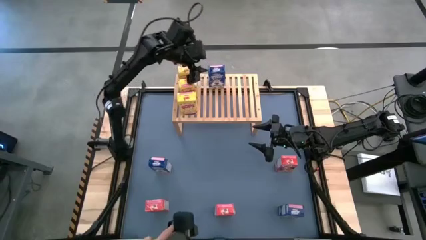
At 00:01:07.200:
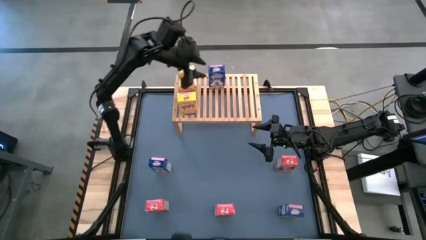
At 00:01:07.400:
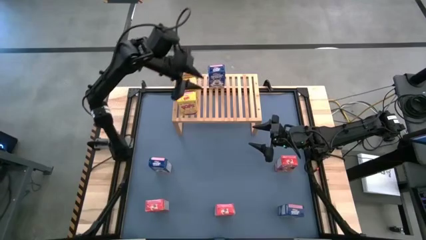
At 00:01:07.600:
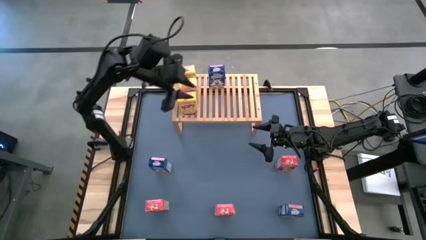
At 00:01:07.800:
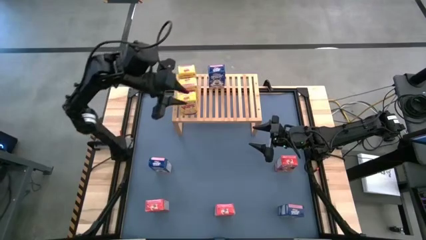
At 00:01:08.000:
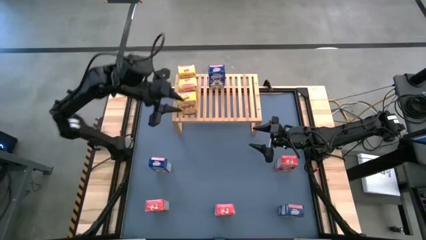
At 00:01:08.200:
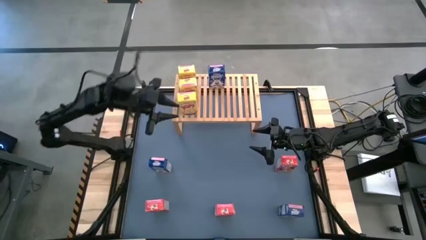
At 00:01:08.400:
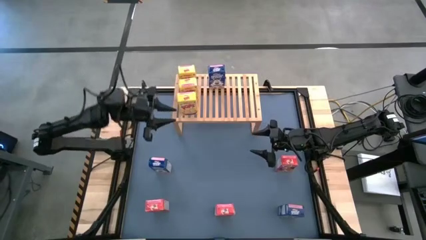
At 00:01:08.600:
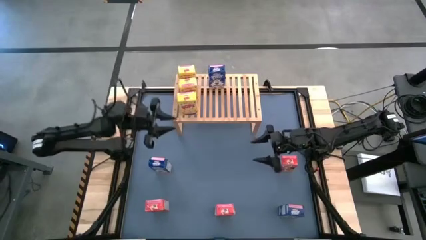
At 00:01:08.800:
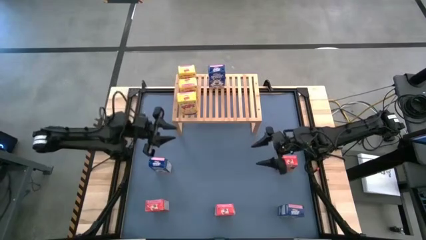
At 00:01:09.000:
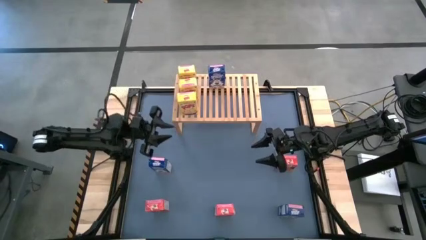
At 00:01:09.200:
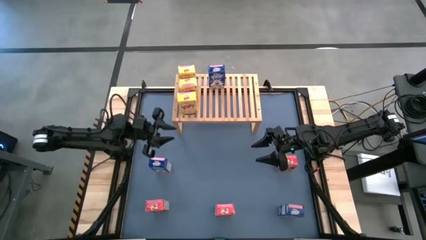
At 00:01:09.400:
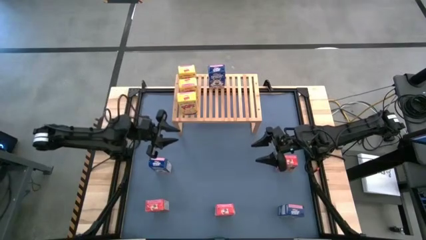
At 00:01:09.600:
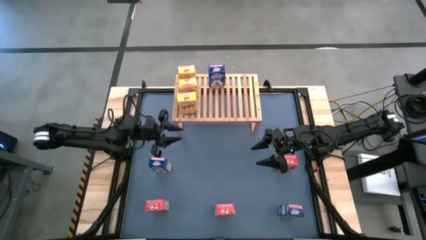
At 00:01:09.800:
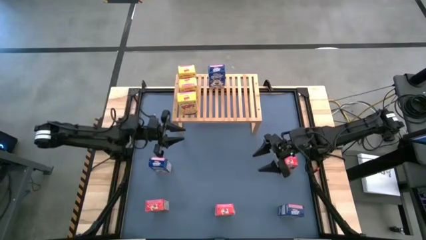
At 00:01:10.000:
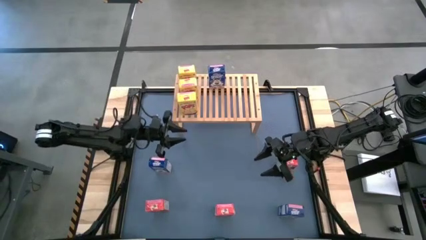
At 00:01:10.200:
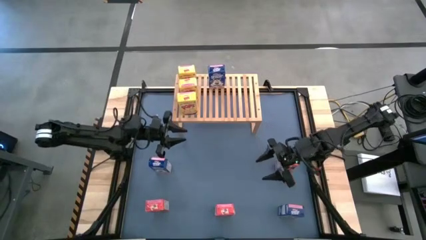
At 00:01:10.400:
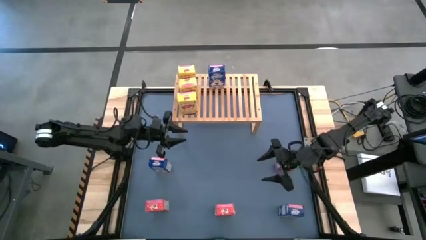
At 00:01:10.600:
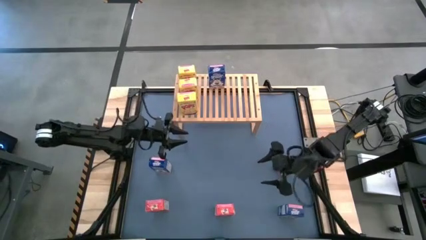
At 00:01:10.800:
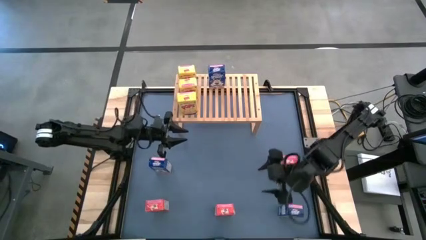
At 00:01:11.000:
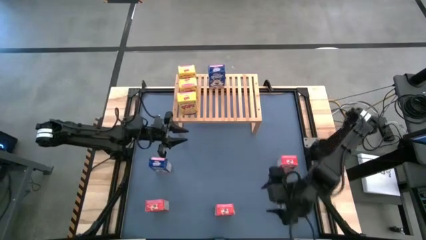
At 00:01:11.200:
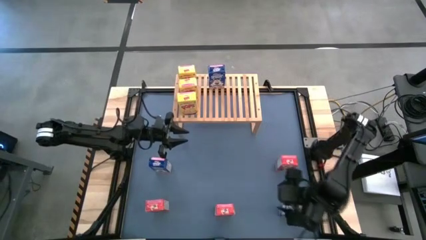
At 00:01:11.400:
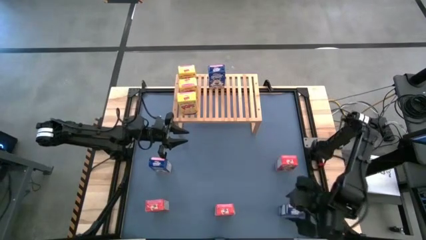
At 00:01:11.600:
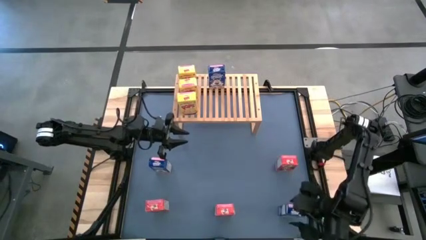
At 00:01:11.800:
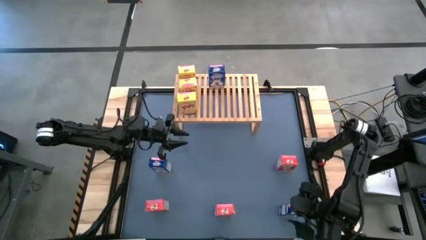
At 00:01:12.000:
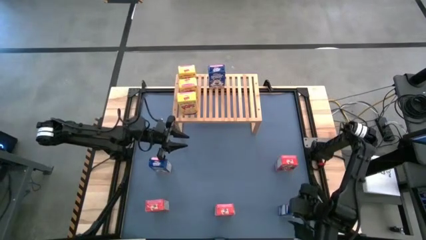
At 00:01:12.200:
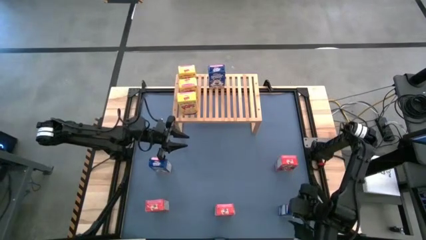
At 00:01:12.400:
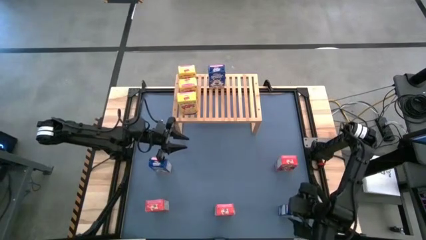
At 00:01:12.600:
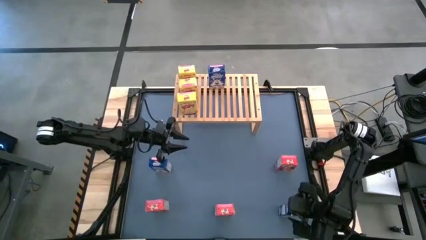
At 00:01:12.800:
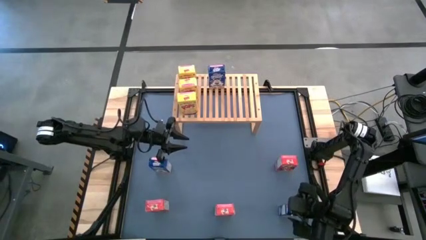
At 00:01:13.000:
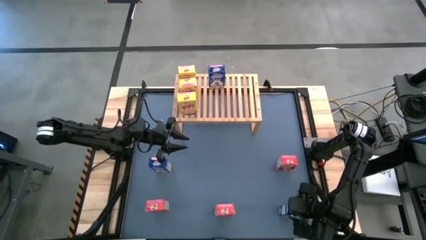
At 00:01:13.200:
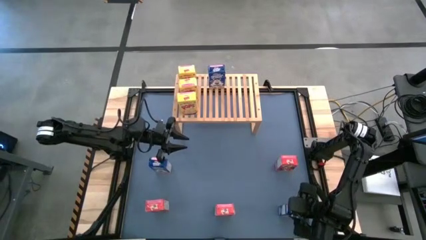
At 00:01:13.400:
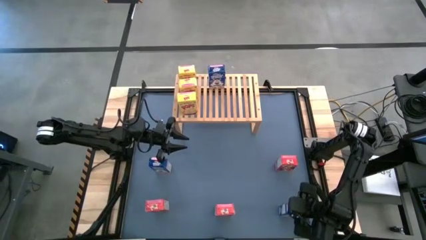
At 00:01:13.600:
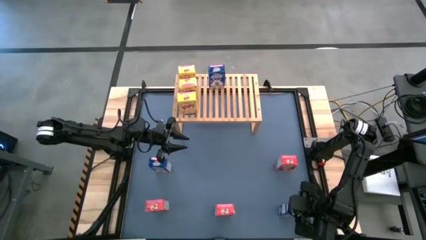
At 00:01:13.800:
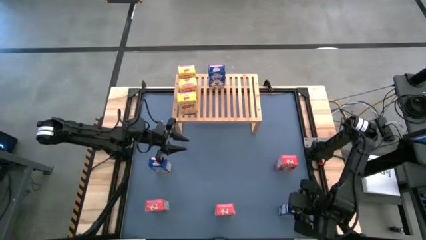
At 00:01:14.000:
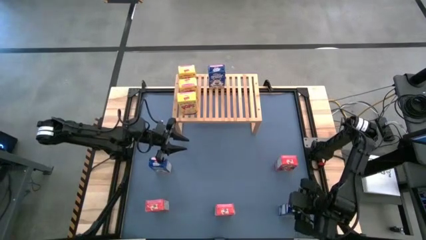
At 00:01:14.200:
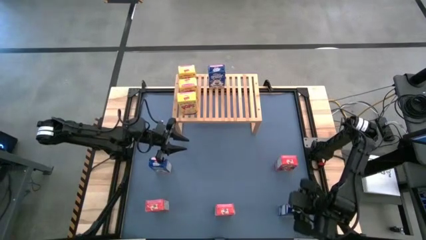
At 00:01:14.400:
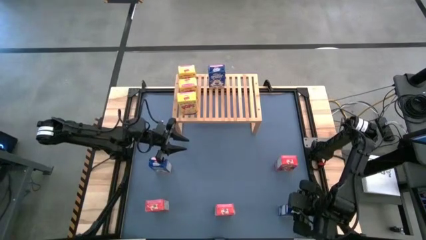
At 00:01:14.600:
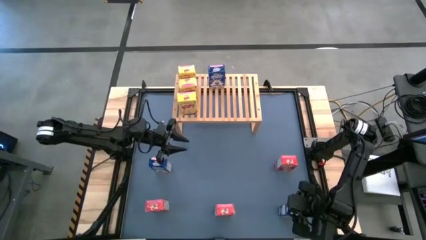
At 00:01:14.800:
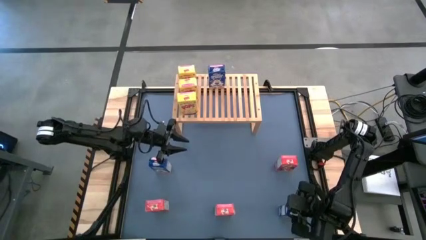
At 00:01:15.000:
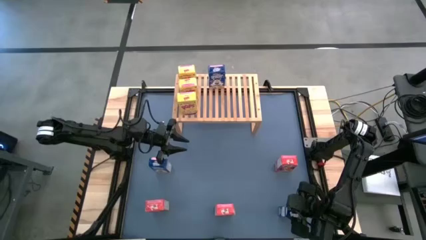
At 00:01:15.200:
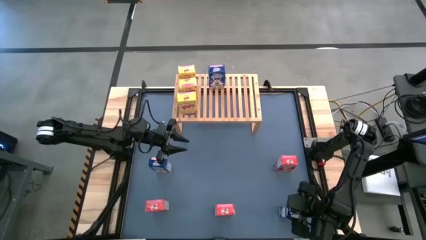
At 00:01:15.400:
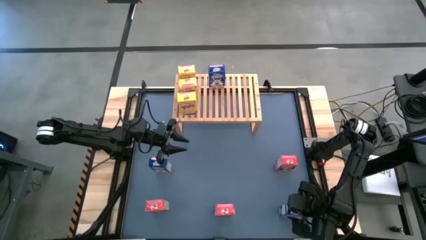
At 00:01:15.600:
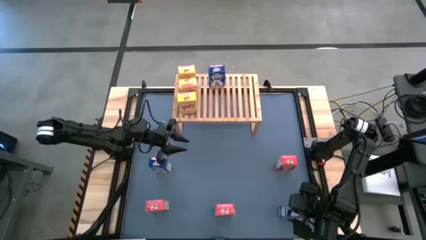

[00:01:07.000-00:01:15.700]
Task: Stack cereal on shelf
Put the right blue cereal box aligned with the other blue cereal box on the shelf

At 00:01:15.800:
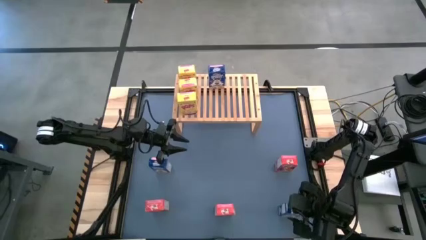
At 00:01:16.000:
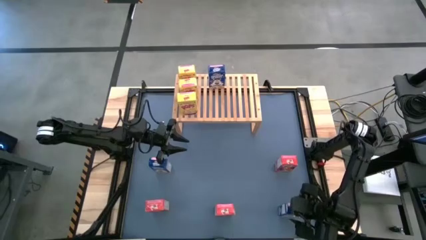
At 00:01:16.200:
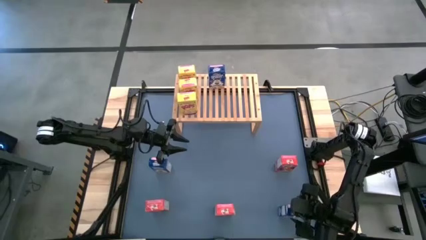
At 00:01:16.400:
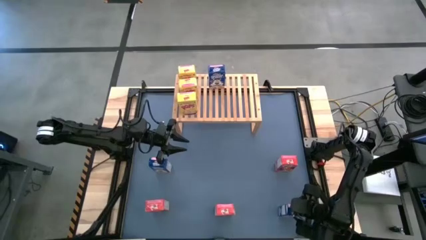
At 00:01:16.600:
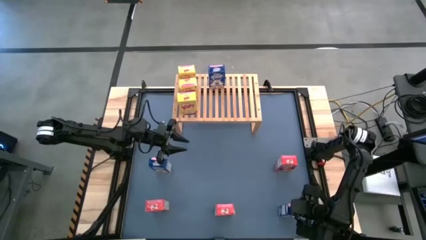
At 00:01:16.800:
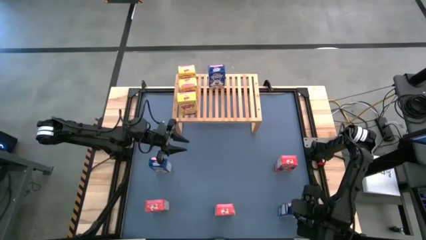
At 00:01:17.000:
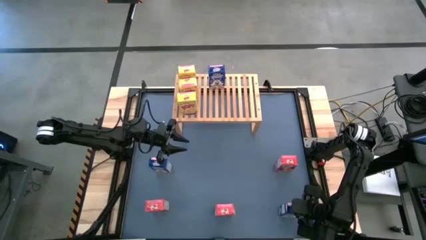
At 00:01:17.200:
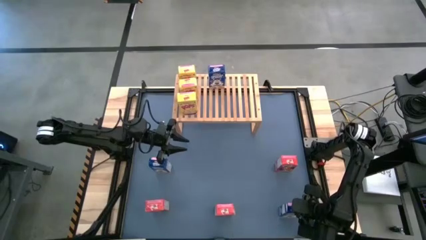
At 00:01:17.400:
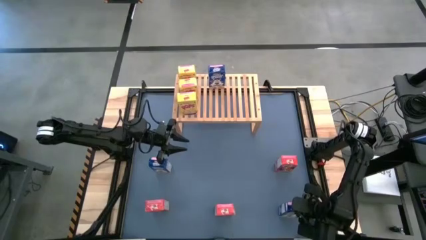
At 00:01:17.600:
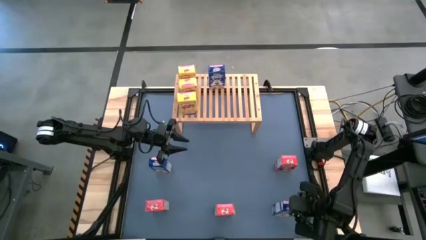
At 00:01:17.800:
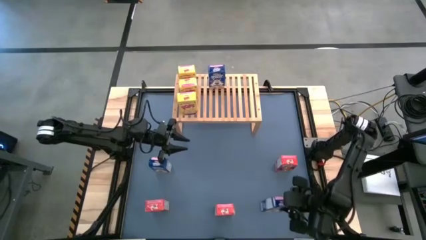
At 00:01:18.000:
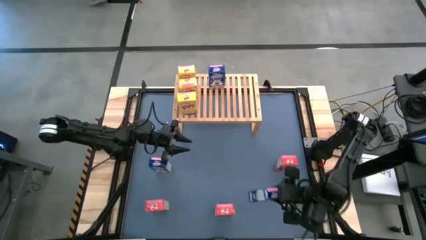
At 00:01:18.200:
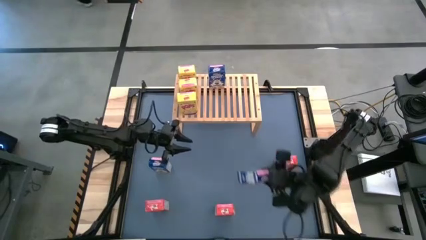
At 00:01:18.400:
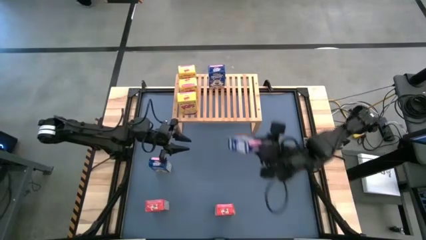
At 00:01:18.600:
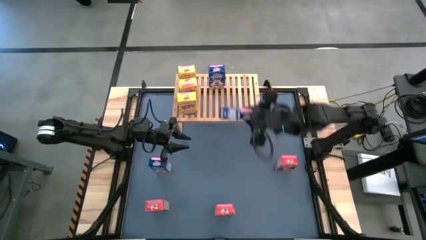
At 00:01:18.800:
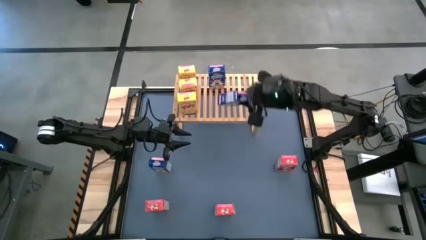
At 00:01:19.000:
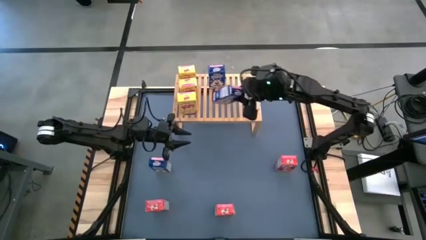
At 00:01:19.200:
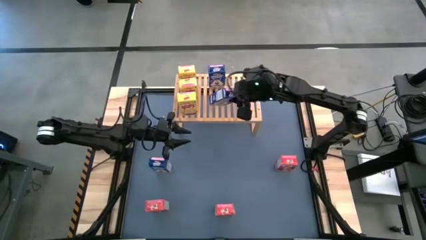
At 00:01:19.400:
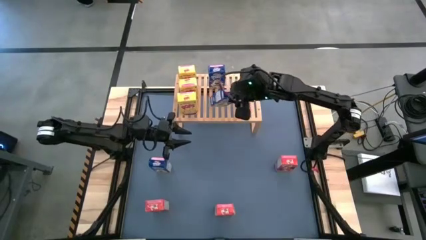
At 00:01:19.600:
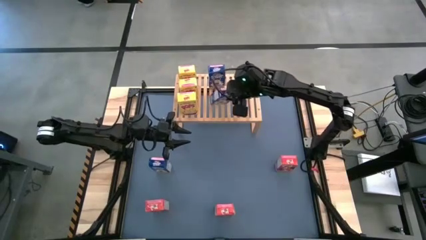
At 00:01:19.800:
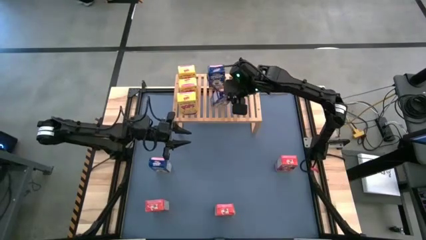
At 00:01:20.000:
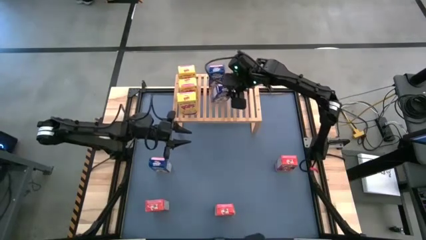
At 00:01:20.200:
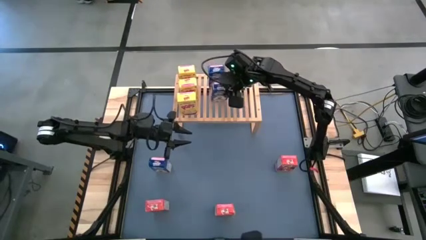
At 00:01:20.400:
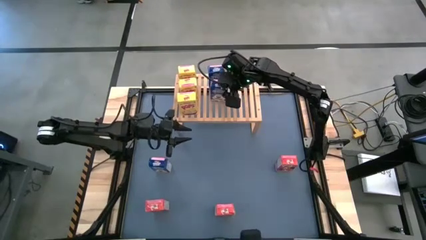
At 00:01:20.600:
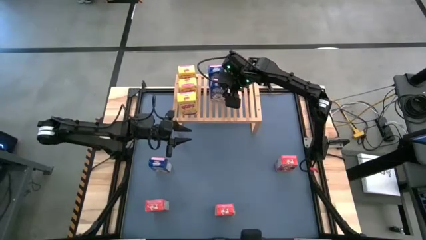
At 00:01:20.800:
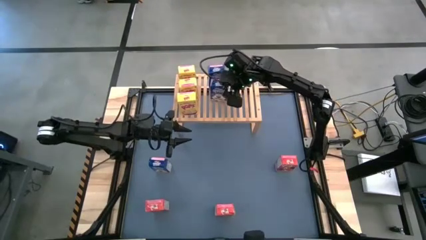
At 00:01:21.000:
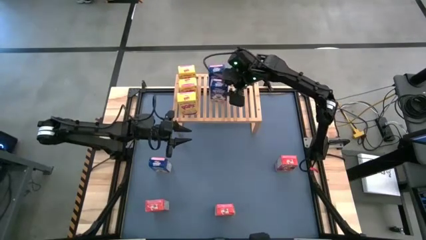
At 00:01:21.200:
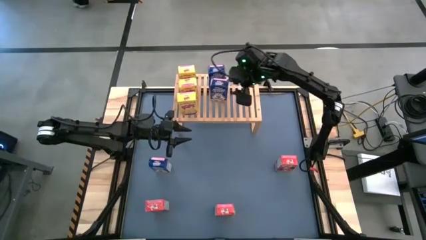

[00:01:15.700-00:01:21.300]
Put the right blue cereal box aligned with the other blue cereal box on the shelf

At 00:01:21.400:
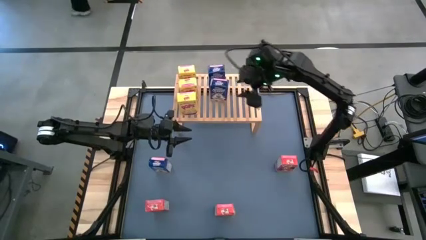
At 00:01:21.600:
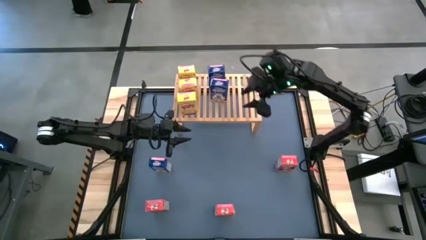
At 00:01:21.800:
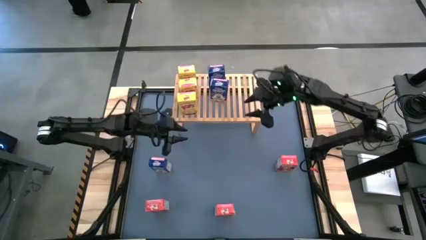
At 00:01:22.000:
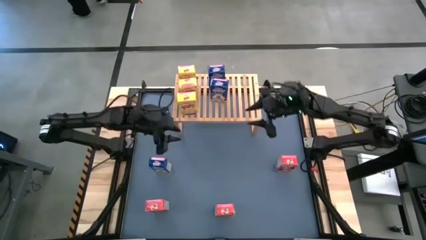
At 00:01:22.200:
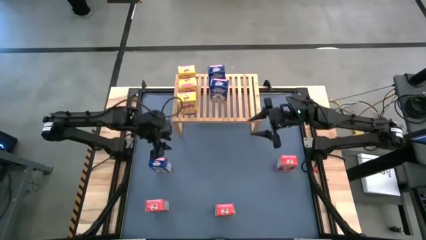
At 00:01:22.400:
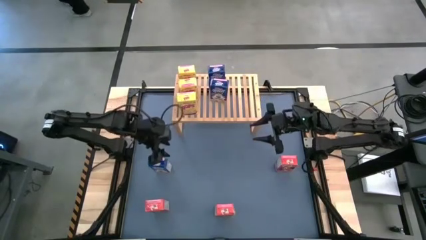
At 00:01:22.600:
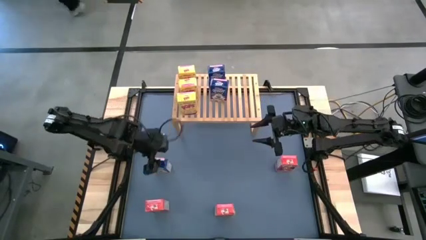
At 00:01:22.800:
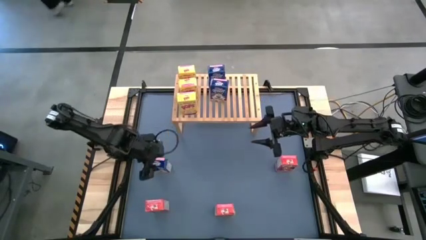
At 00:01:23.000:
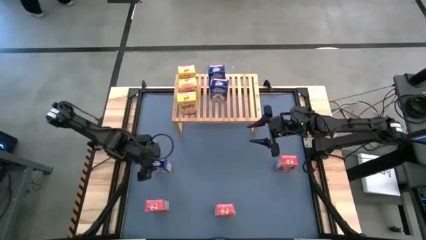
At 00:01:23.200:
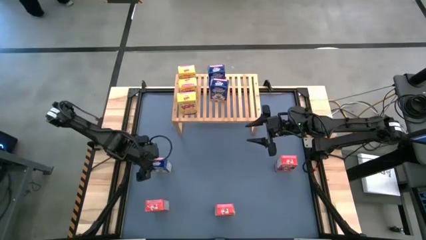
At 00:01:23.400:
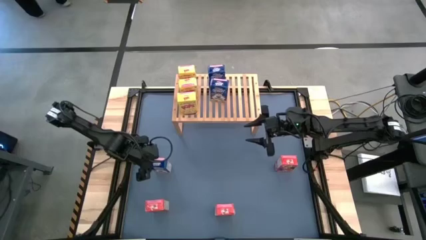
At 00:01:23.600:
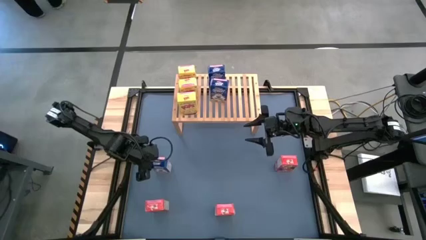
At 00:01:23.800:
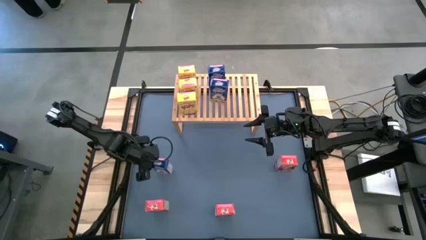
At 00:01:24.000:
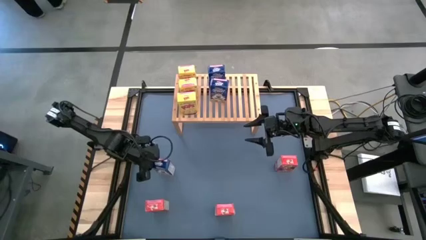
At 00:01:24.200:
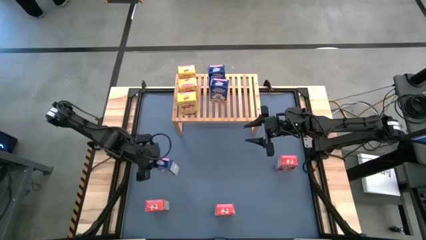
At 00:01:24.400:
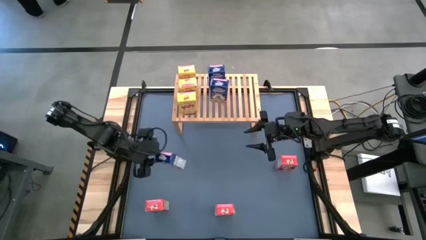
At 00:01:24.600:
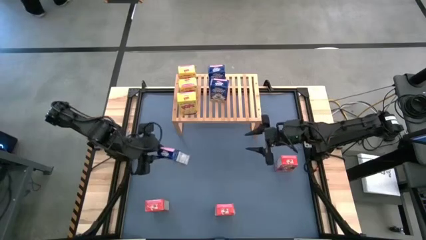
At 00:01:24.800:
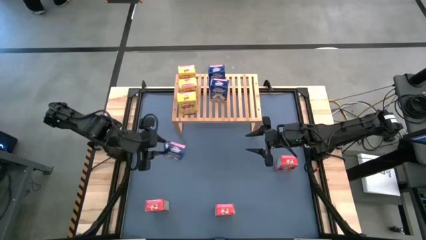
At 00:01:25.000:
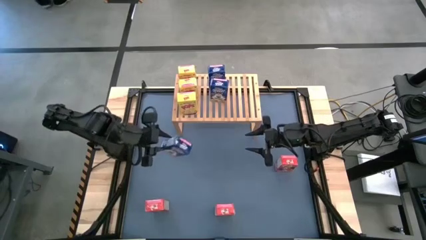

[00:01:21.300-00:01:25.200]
Put the blue cereal box aligned with the other blue cereal box on the shelf
